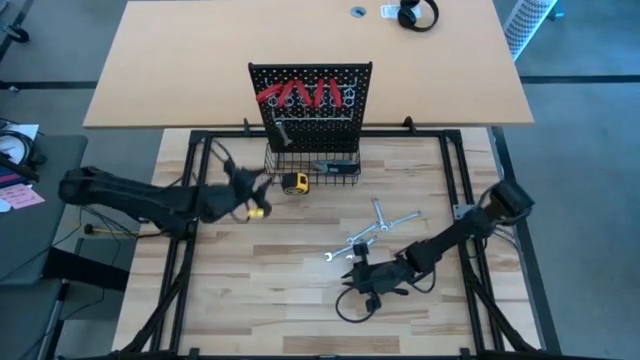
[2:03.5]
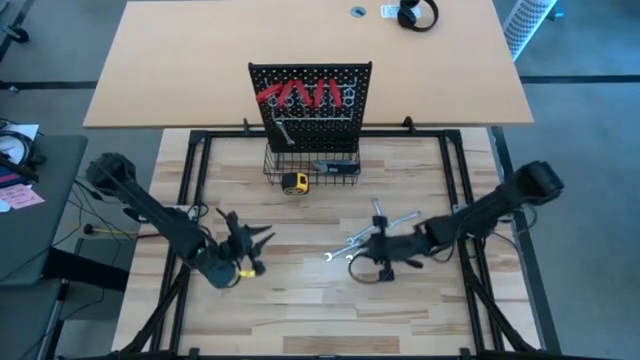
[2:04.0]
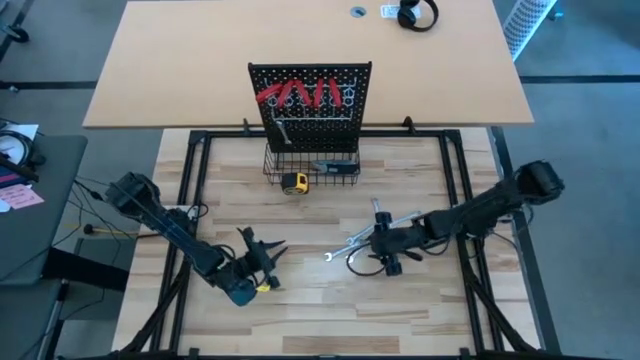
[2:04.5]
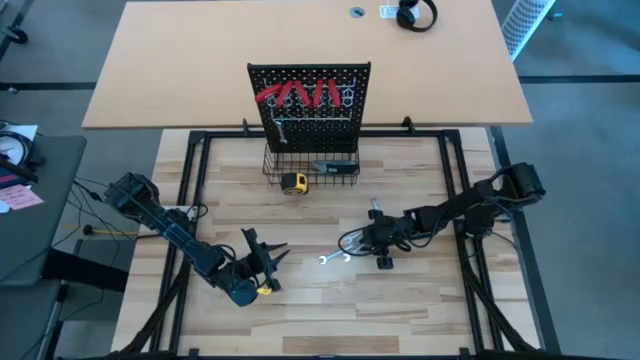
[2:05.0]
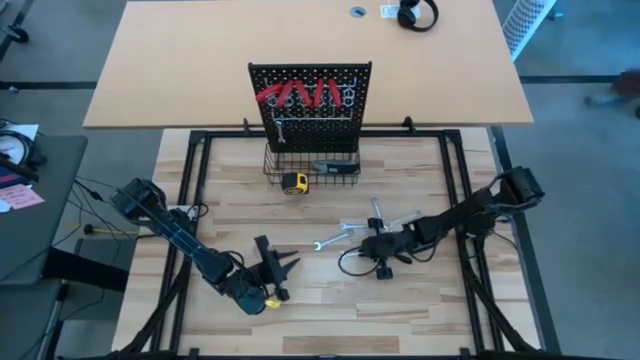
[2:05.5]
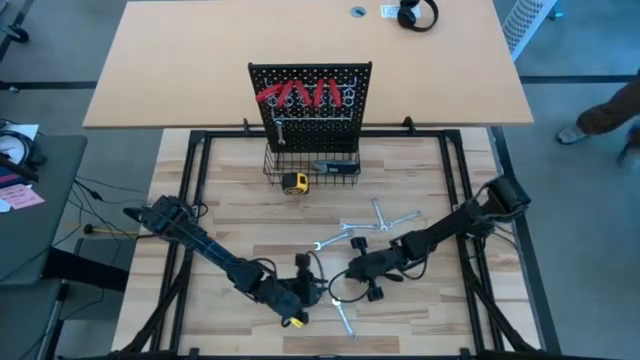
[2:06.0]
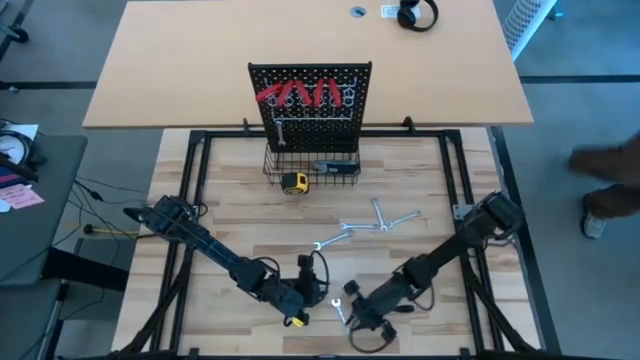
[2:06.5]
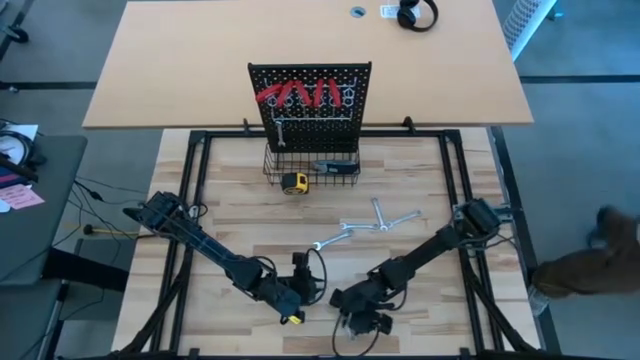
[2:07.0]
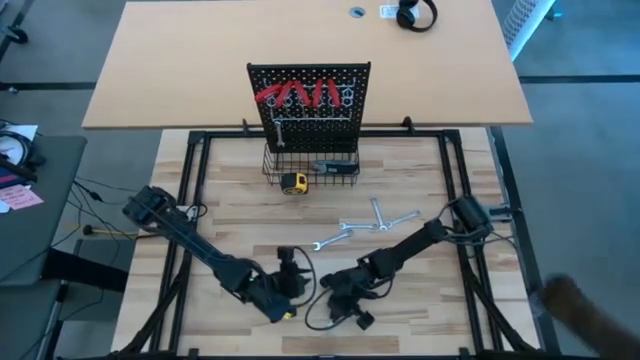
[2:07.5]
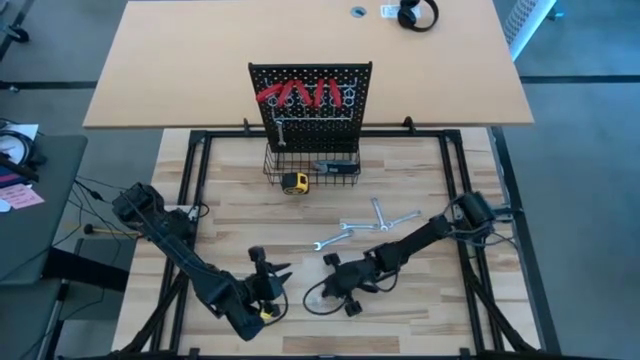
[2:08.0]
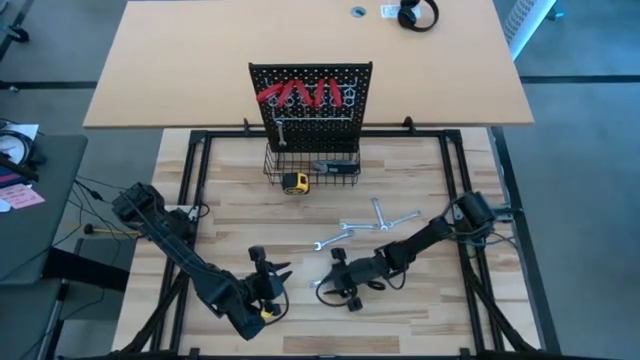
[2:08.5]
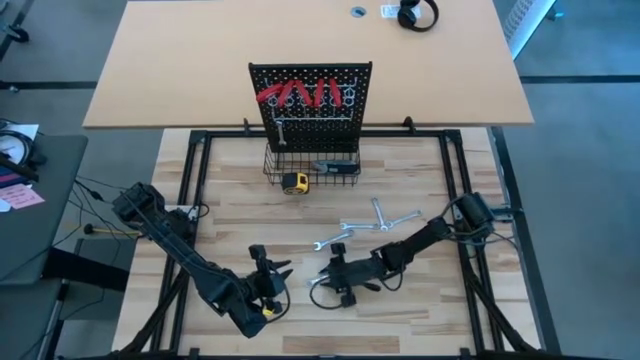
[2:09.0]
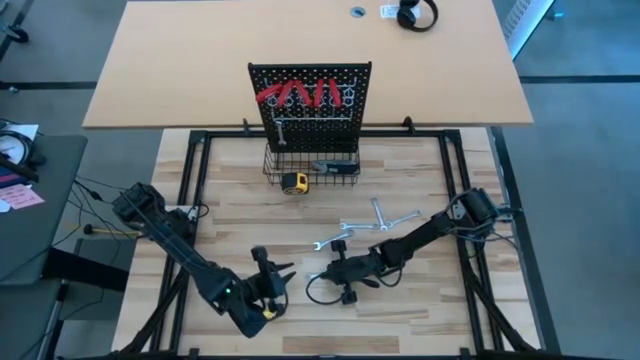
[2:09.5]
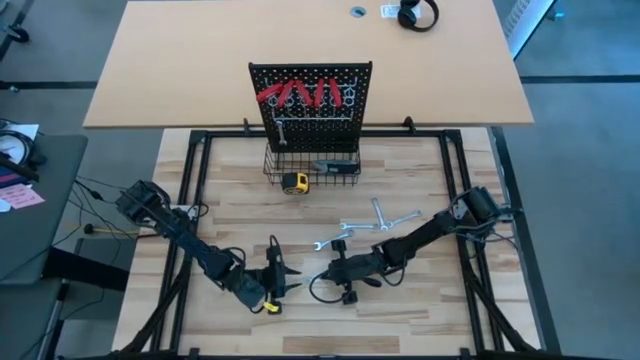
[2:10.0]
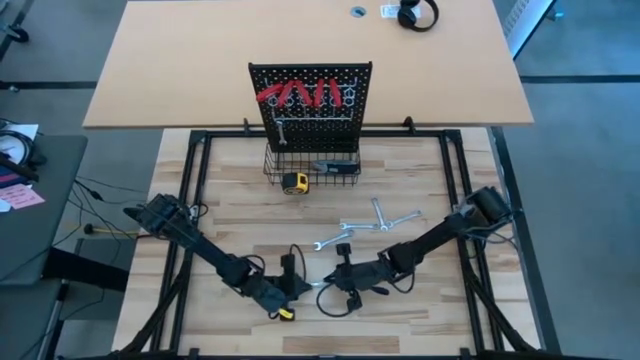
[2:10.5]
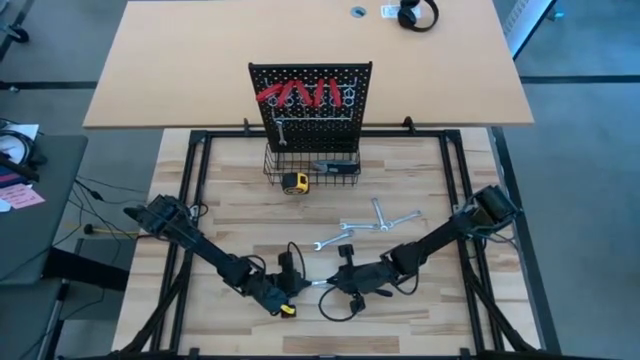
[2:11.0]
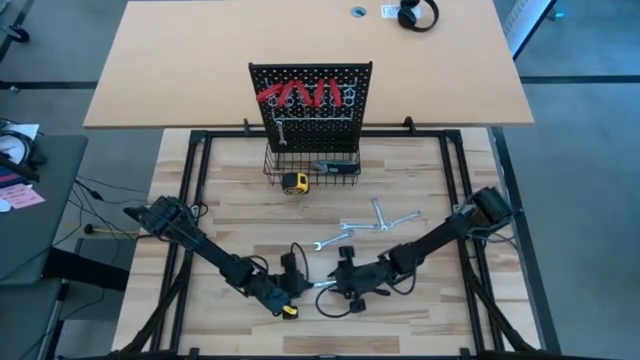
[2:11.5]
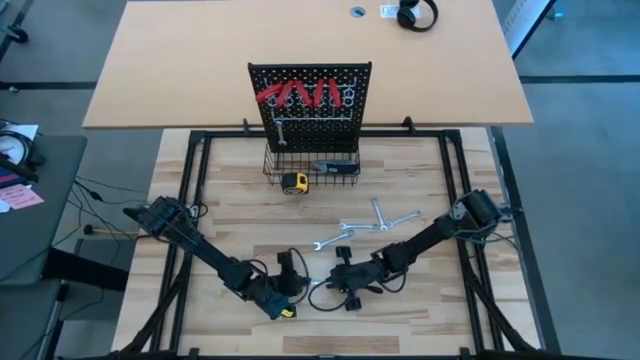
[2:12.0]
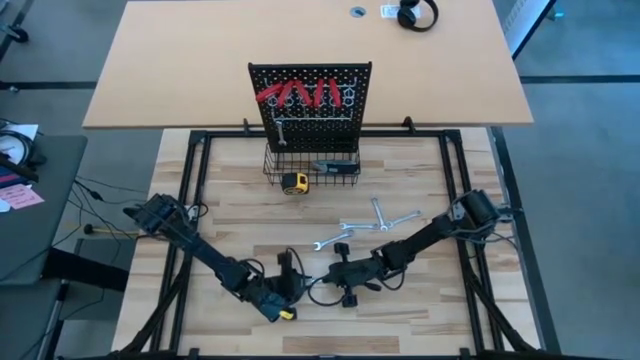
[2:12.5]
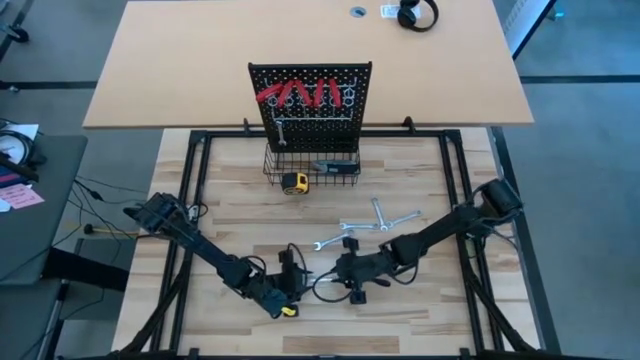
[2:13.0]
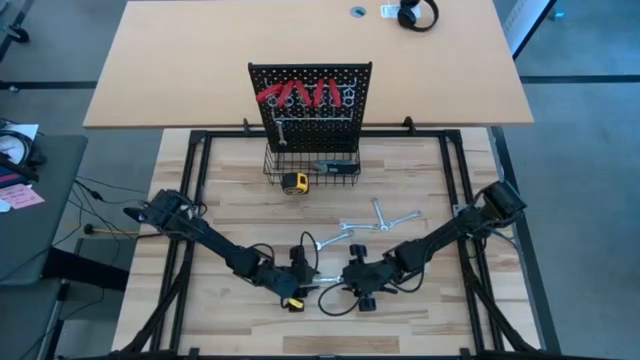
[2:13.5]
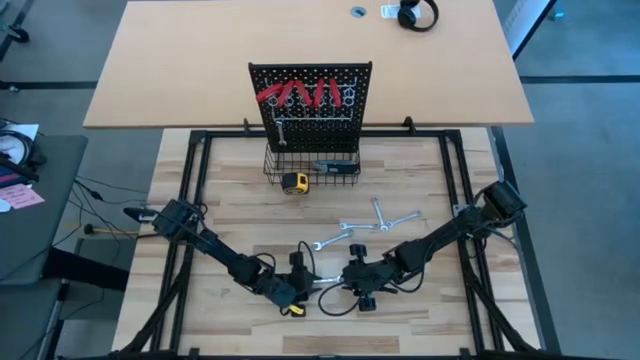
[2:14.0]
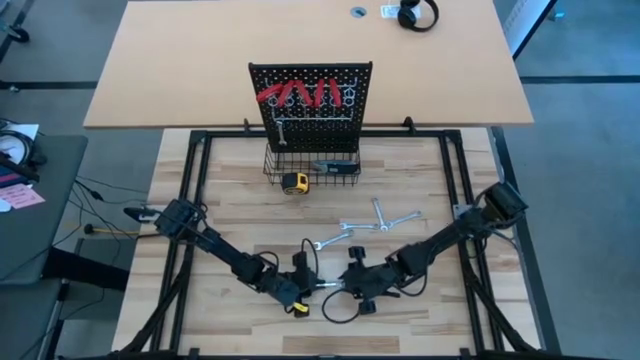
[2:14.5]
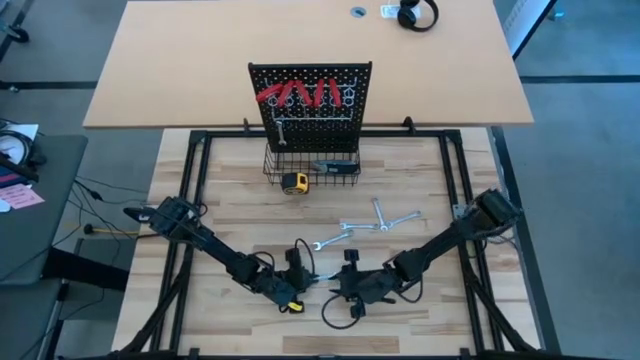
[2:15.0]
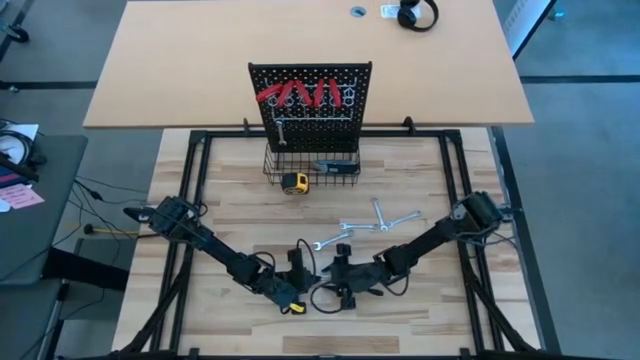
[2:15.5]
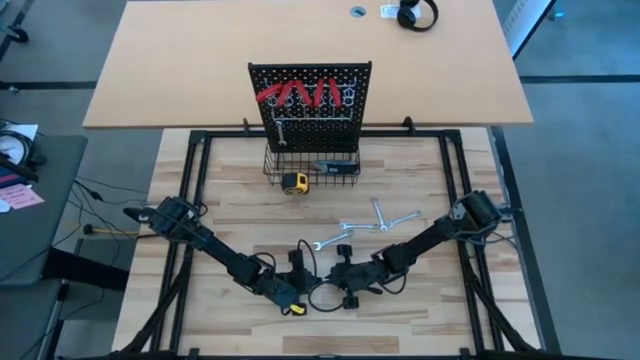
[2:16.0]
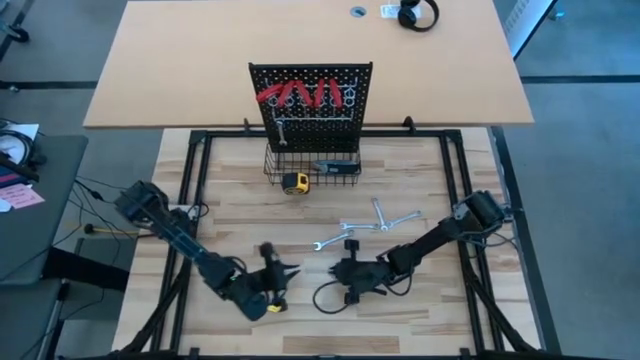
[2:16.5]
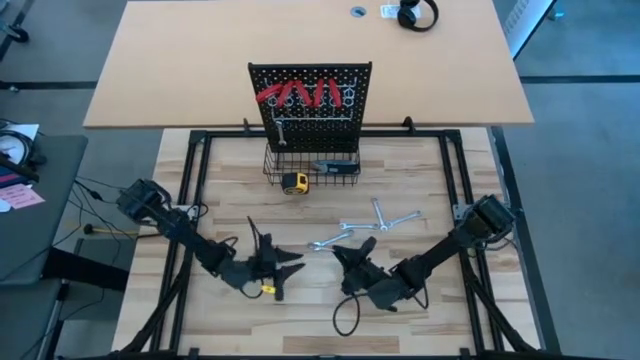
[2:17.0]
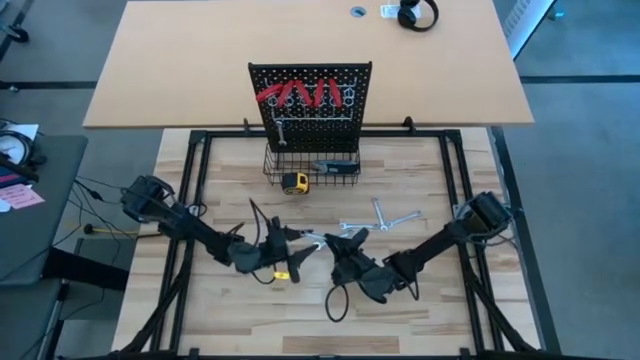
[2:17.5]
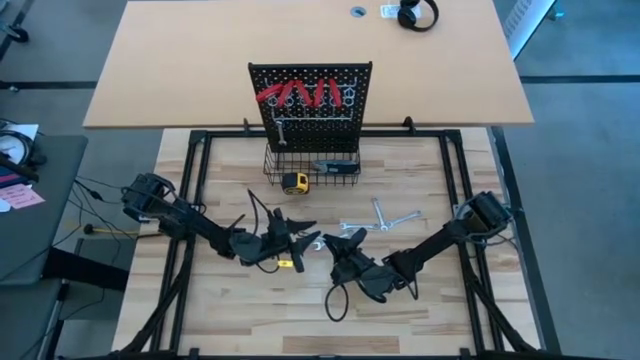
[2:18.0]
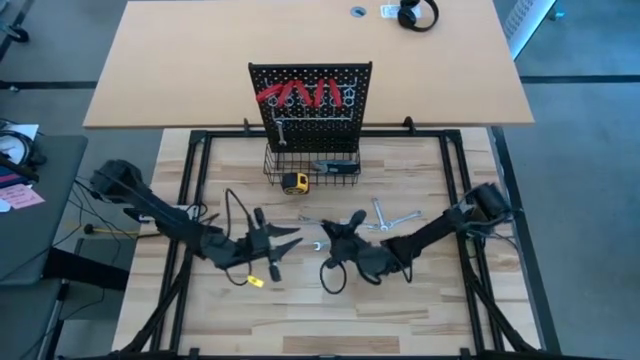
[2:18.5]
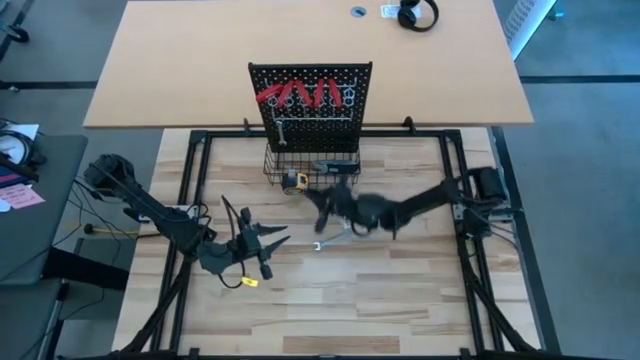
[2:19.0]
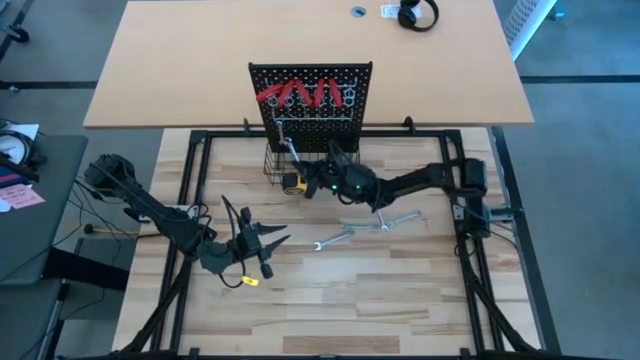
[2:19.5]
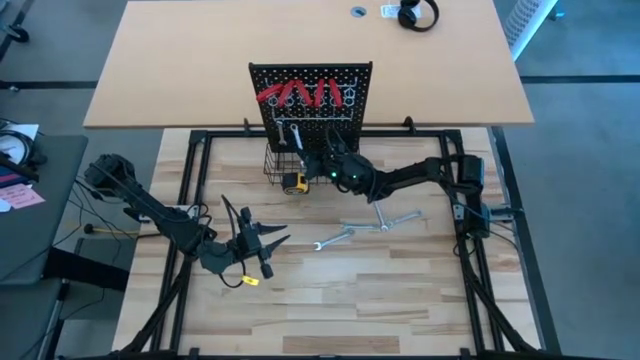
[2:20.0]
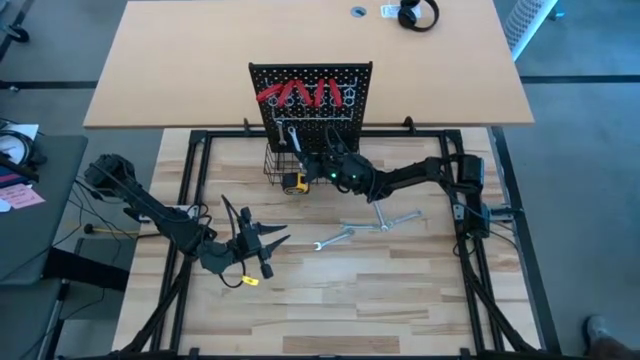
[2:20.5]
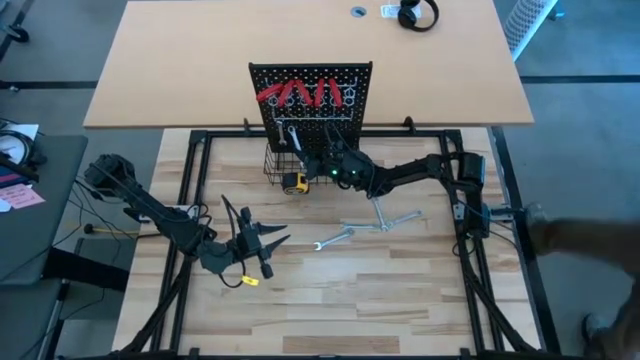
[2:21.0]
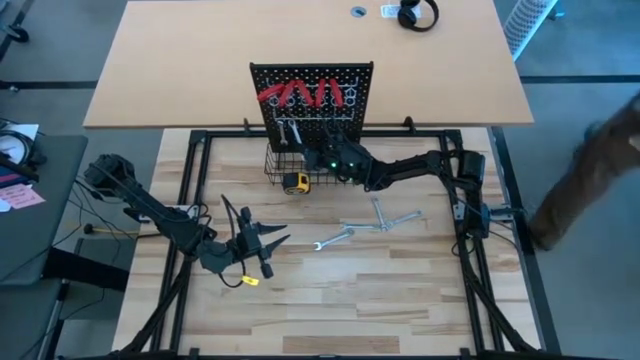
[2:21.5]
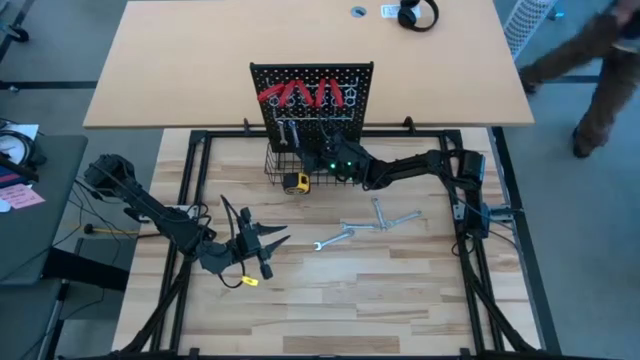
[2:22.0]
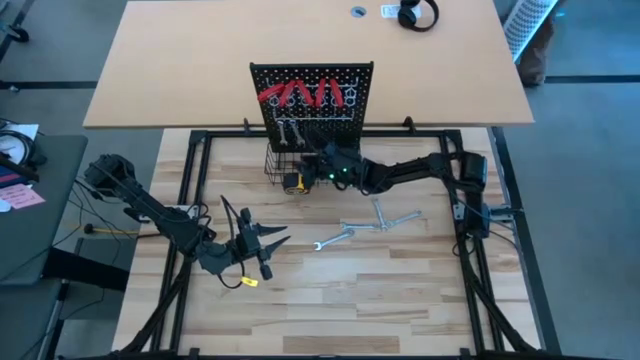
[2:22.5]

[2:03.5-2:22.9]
Task: Hang tools onto peg board
Hang the wrench into the pegboard
